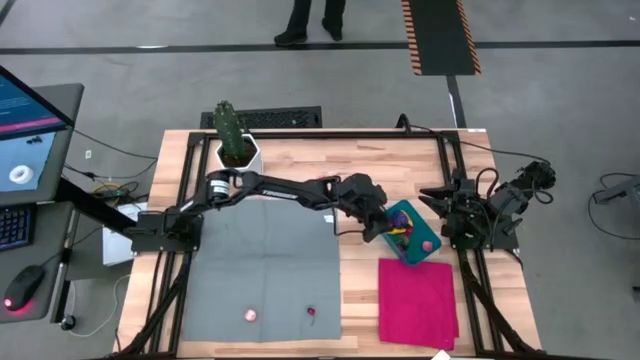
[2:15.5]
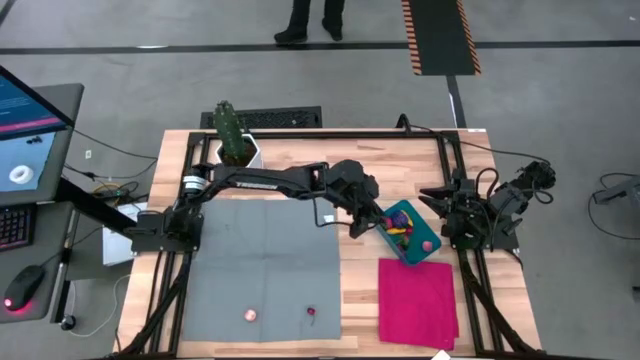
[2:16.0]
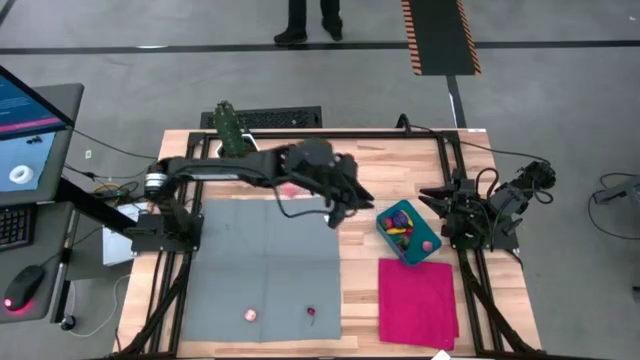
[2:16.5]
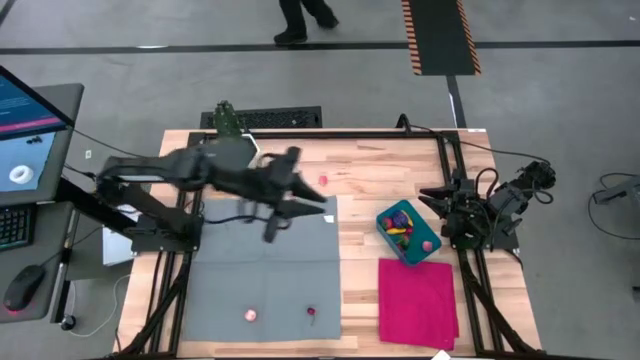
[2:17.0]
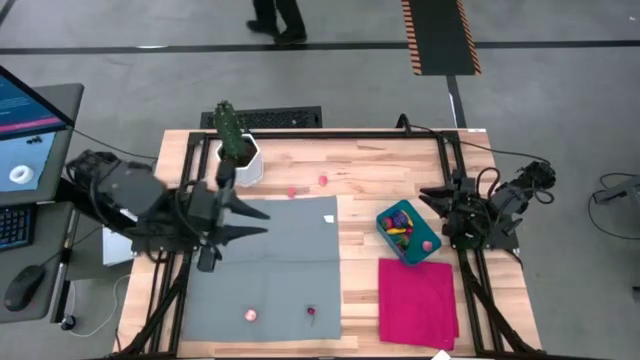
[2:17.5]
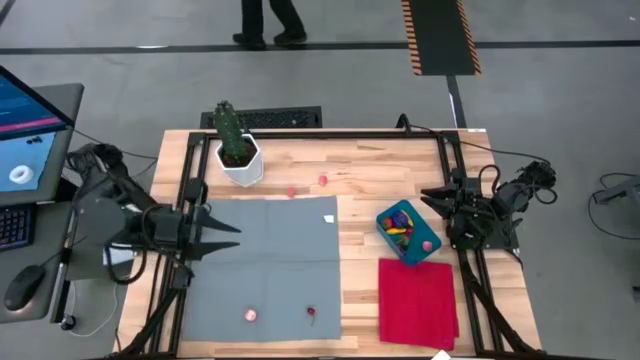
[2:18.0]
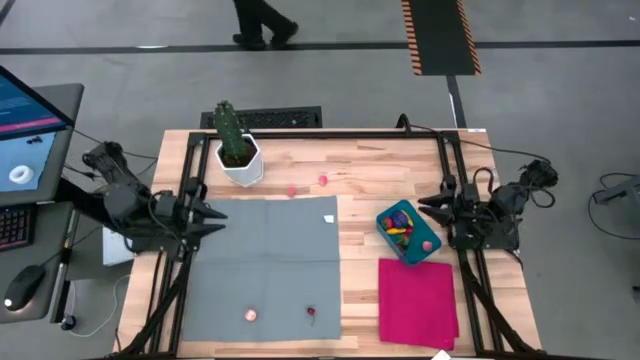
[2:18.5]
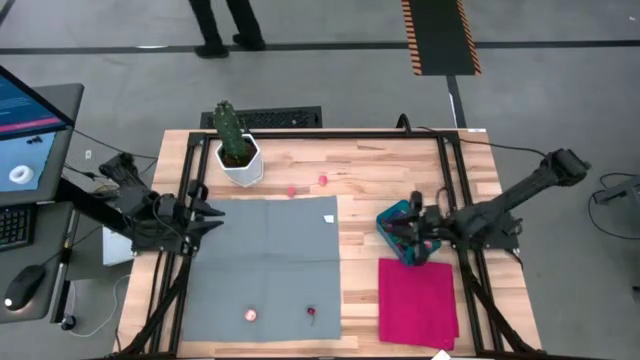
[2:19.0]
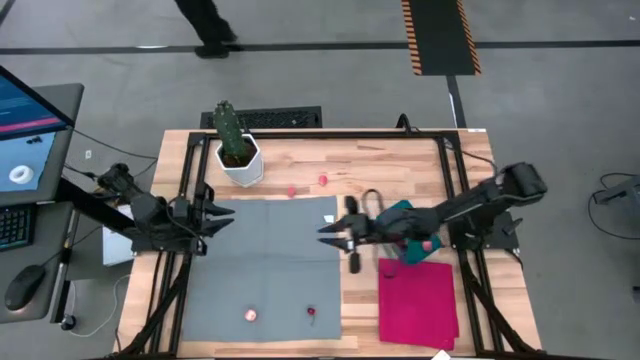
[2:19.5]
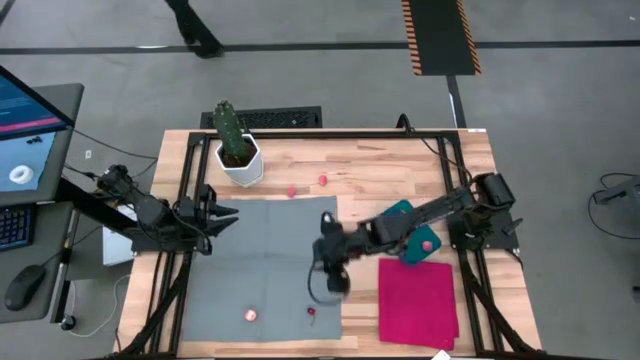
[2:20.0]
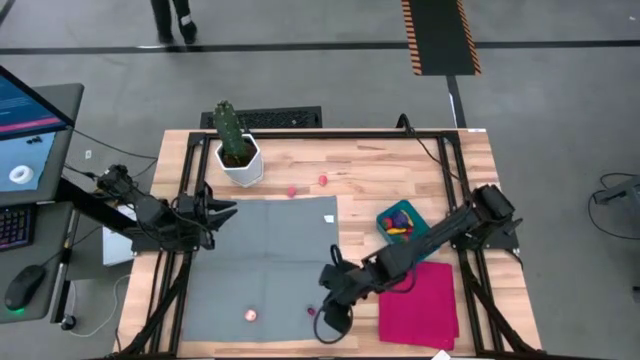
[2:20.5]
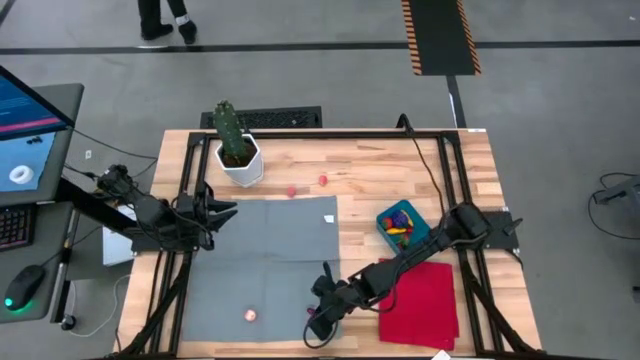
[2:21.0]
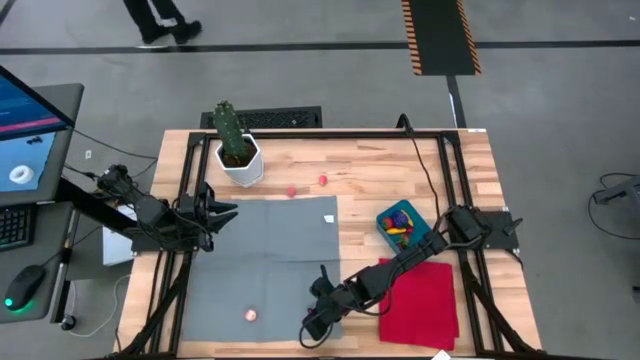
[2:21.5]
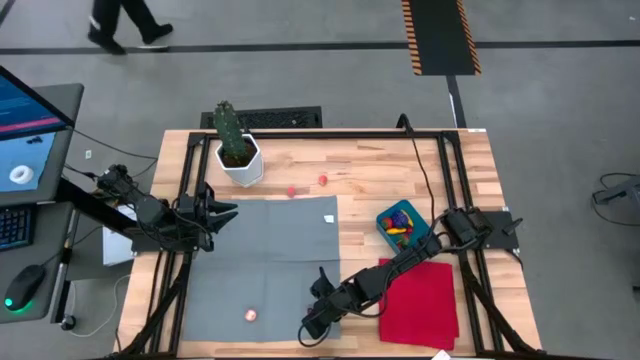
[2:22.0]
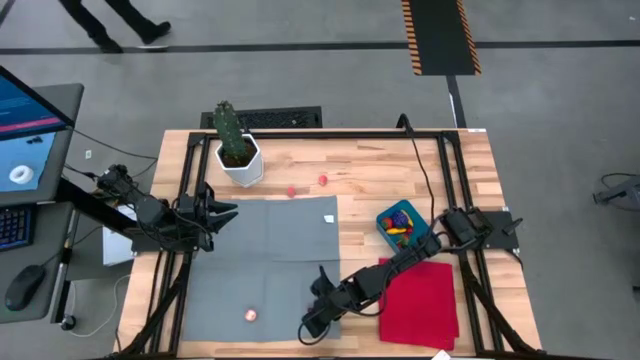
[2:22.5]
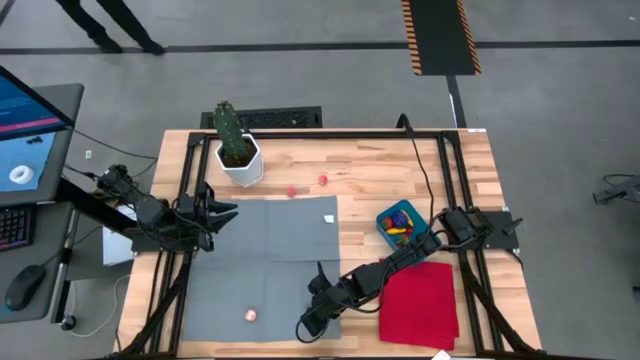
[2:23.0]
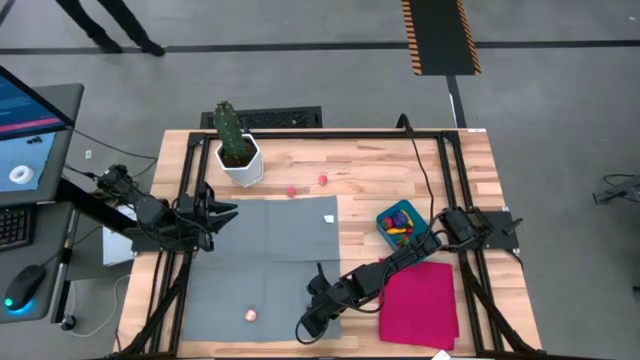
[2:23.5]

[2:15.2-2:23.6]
Task: Pick and placing Produce into tupperware
Put the red cherry into the blue bin

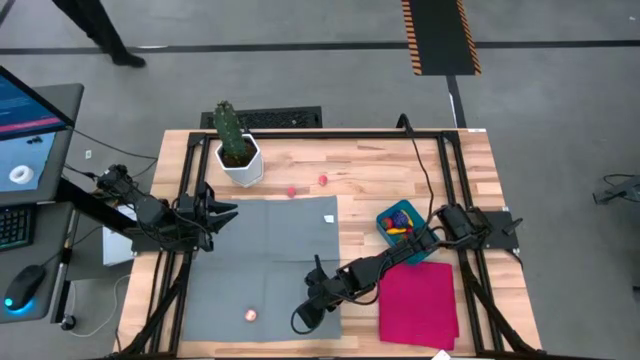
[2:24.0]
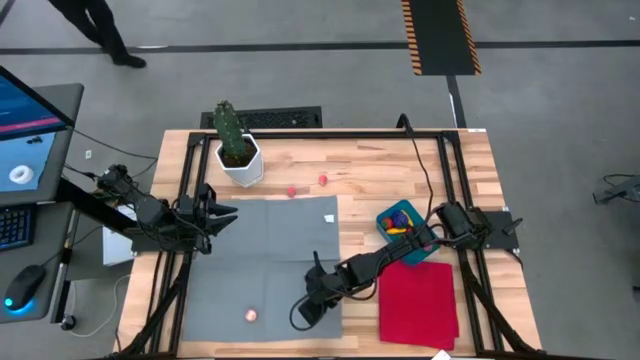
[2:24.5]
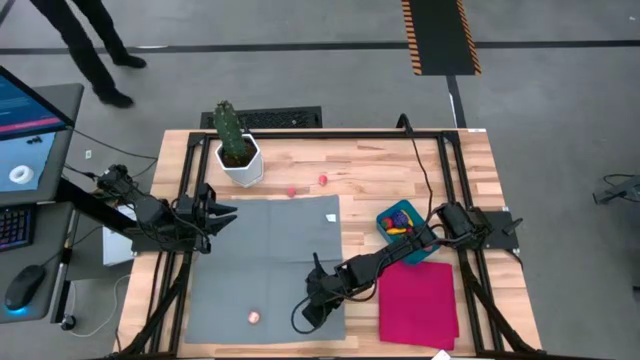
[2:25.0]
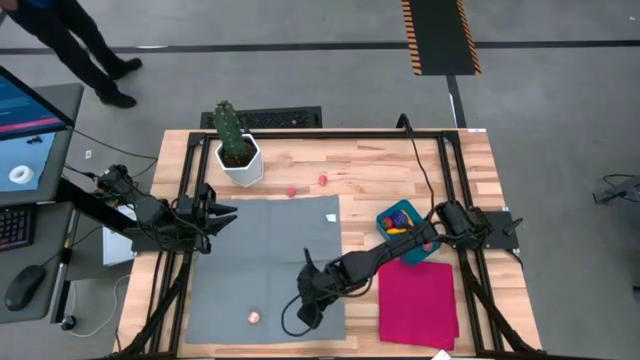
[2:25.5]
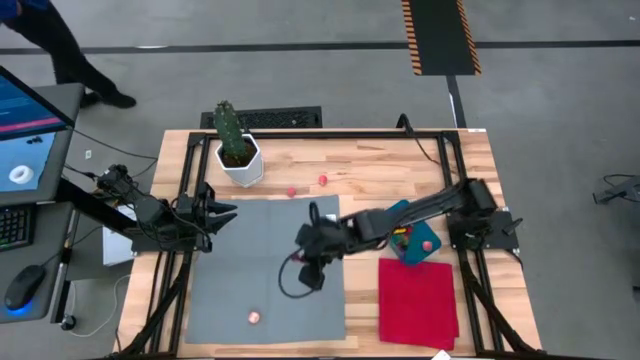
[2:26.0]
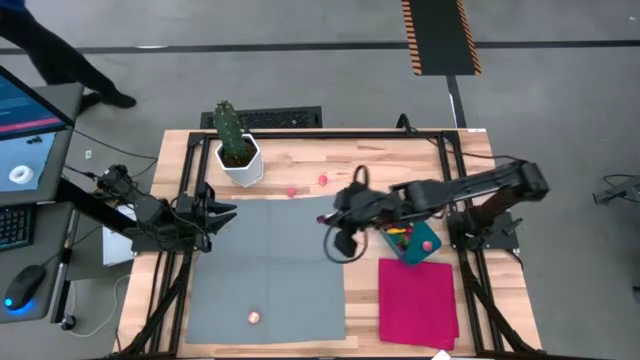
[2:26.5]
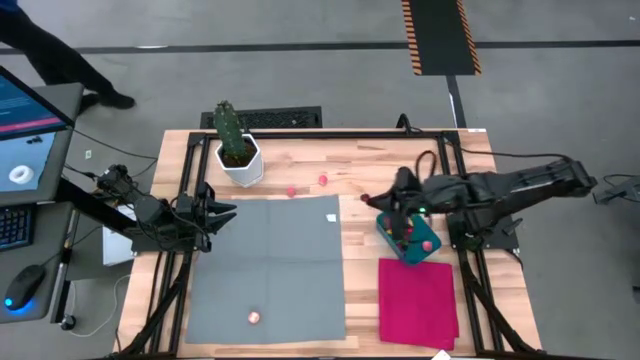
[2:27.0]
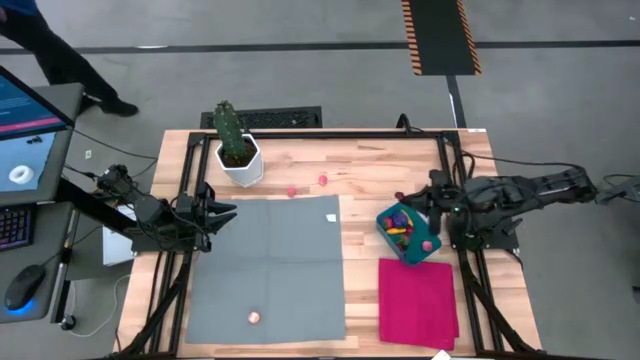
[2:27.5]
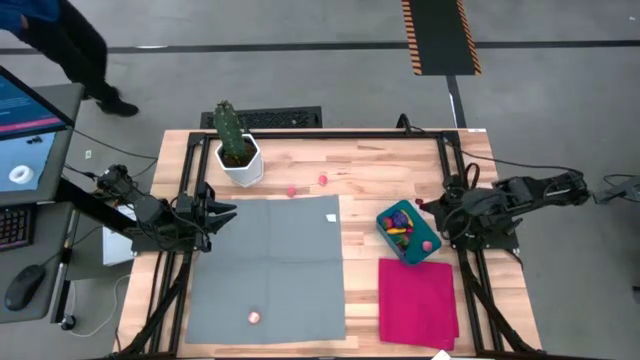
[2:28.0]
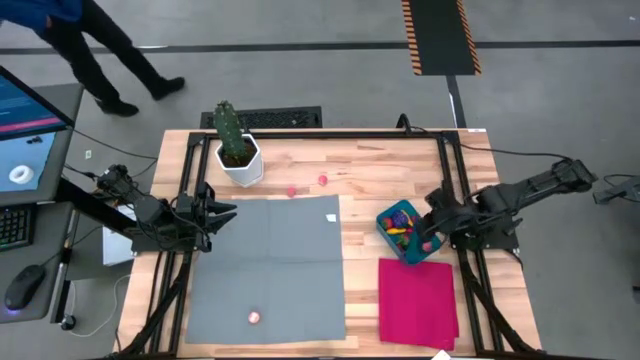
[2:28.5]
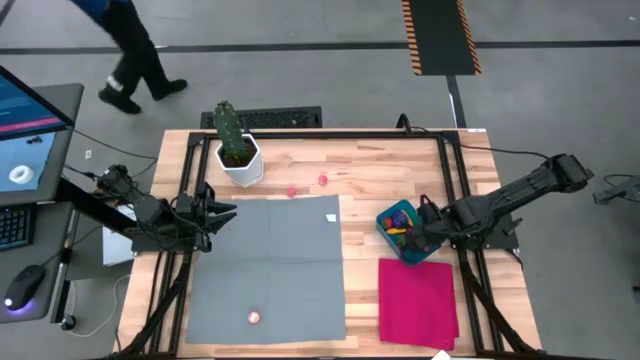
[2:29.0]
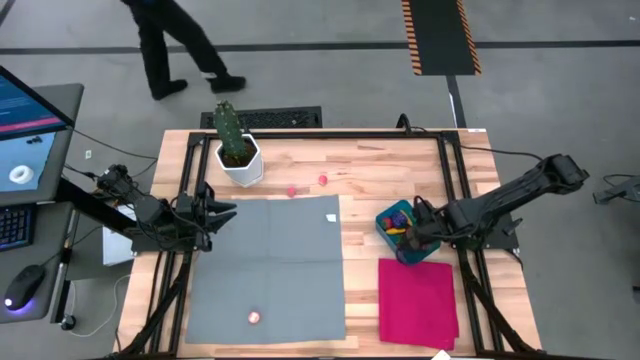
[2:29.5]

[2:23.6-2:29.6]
Put the red cherry into the blue bin

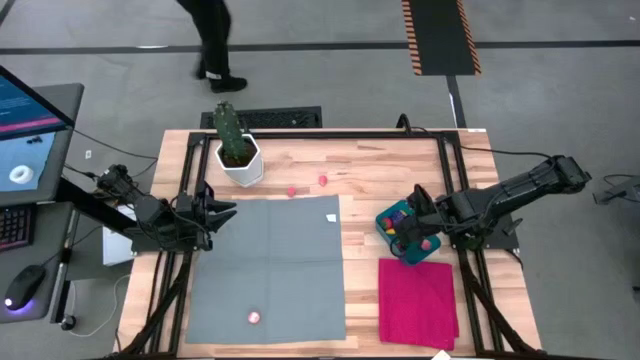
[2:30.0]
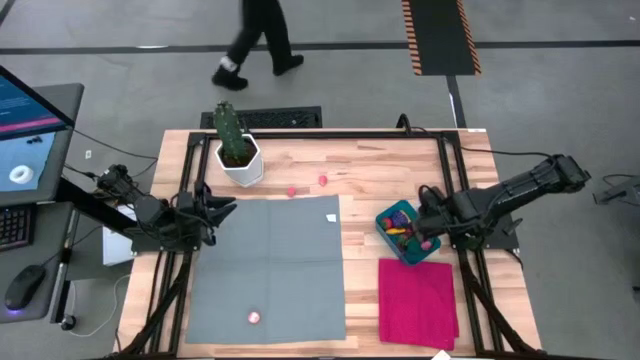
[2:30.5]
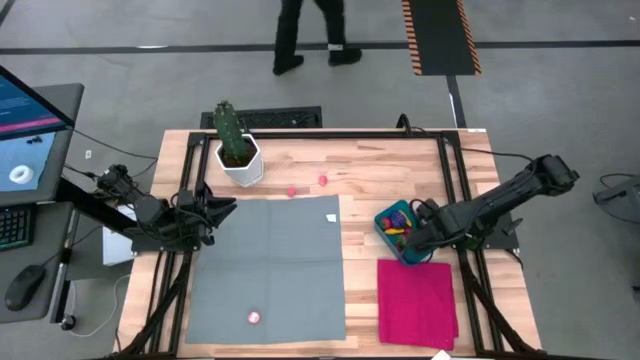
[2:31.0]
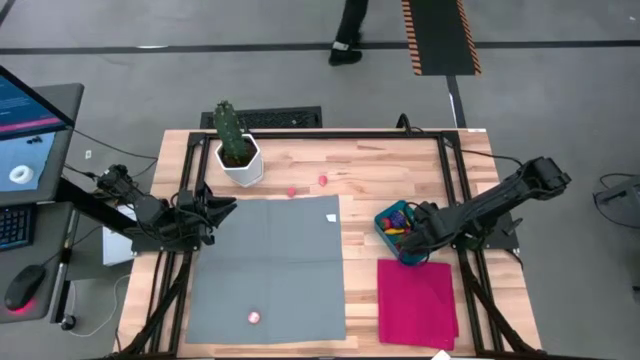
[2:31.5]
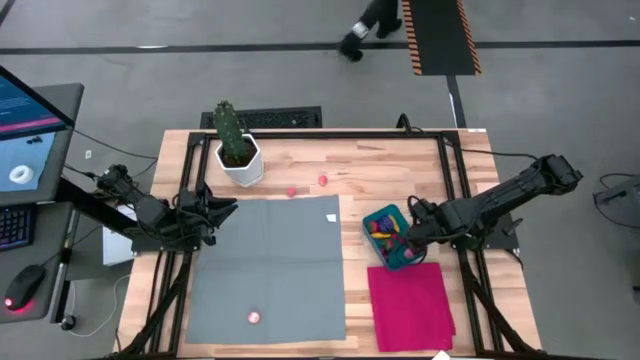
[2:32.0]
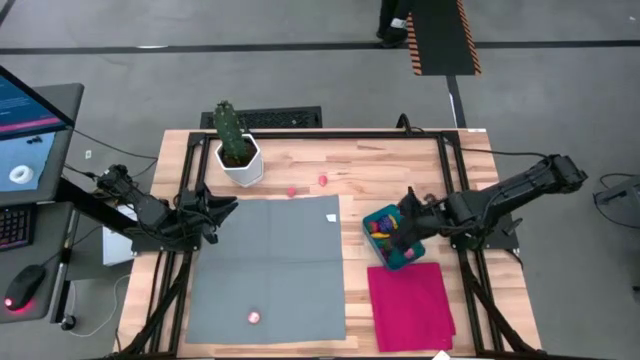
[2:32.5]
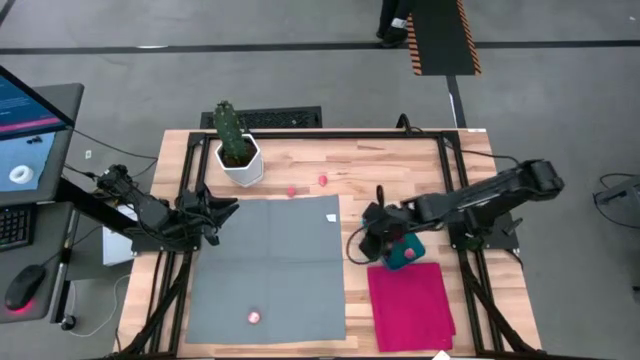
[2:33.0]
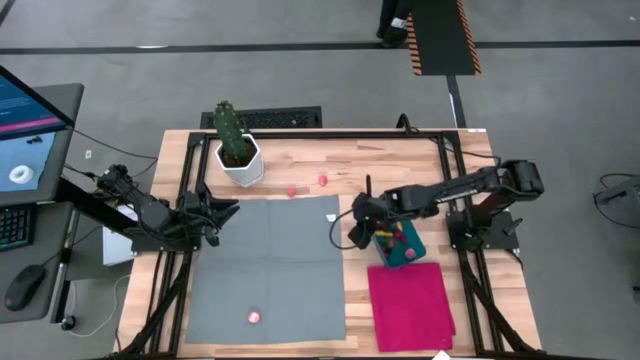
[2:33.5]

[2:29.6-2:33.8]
Adjust the blue bin

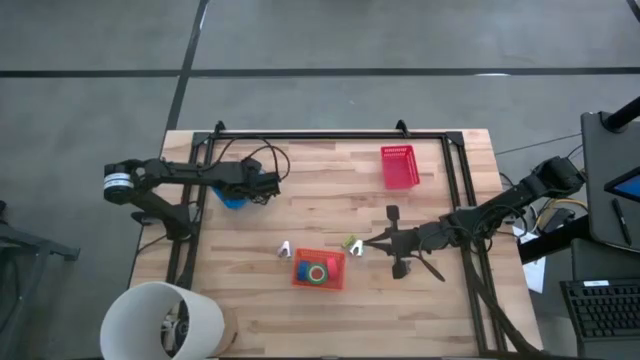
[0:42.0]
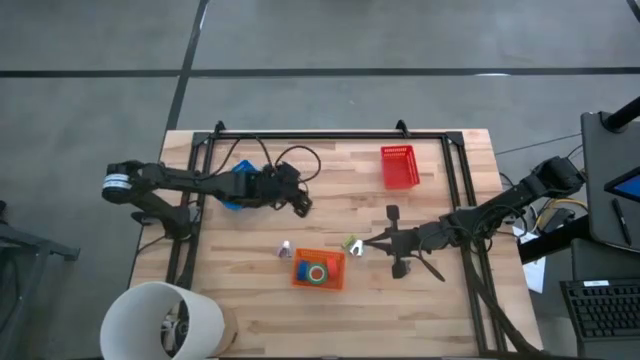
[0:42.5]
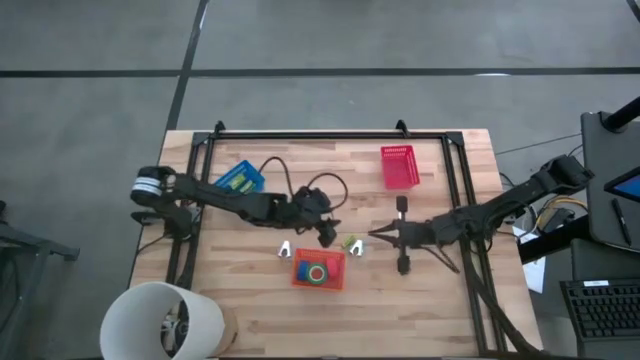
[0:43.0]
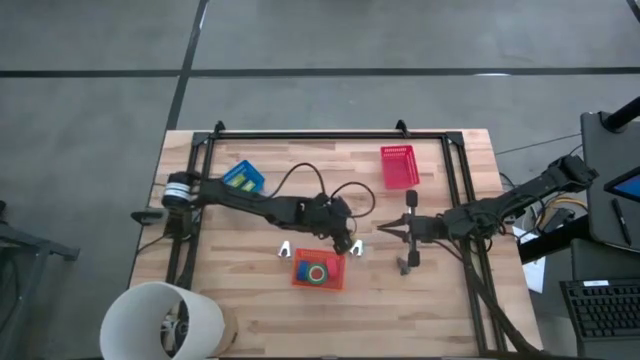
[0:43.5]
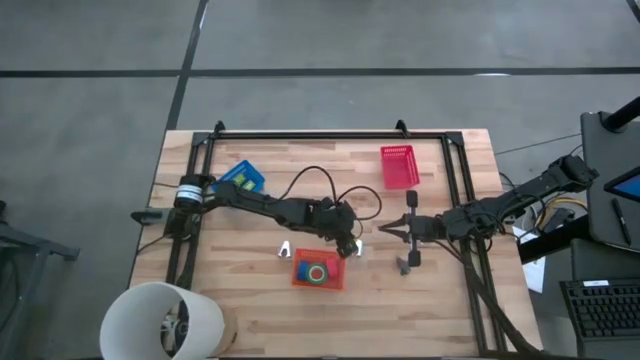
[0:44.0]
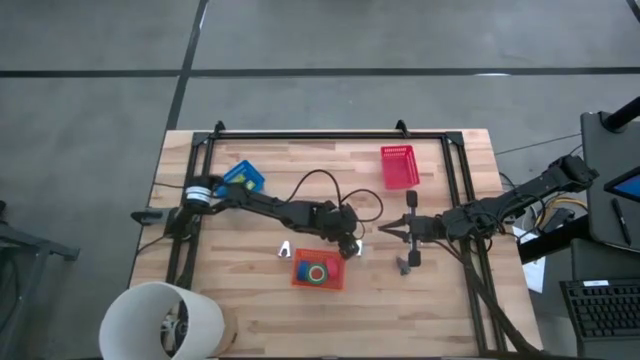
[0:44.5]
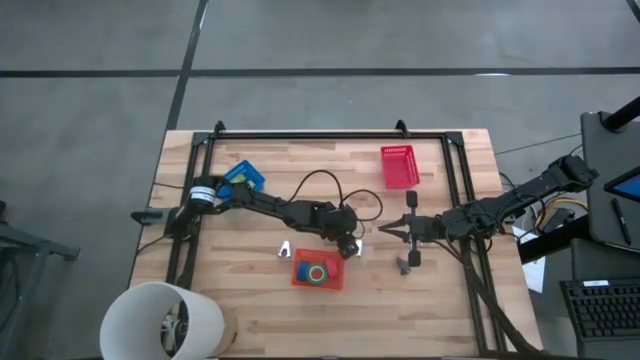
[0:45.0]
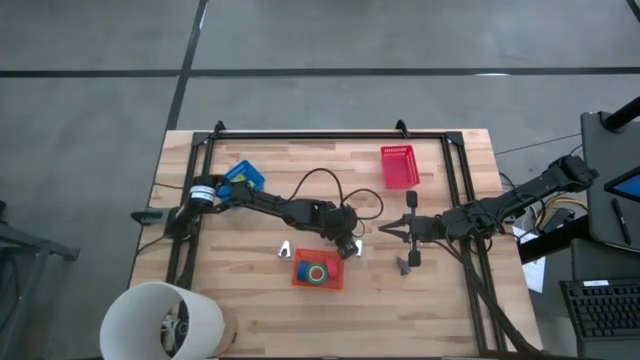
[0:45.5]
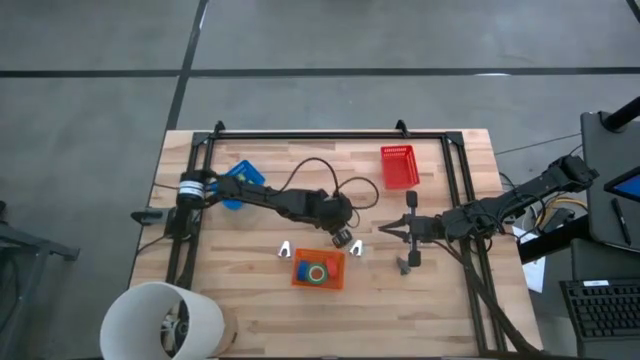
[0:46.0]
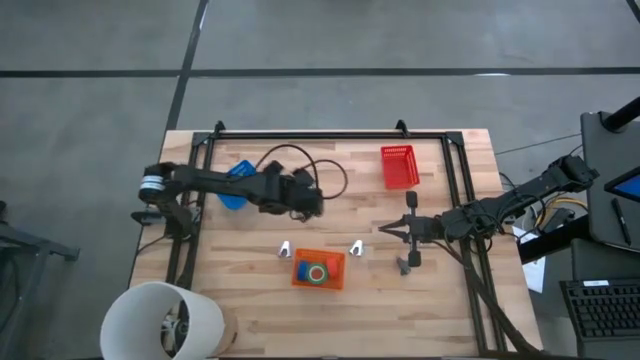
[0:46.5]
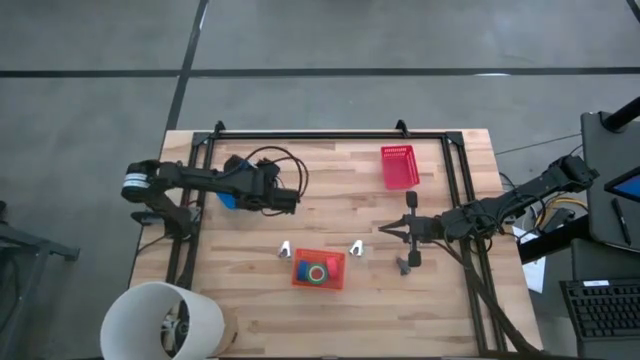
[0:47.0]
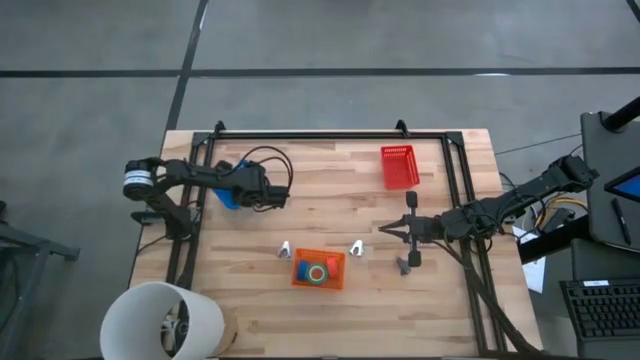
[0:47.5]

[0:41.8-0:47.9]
Task: Pick and place Stapler, Stapler remover, tape
Put the green staple box into the blue bin
